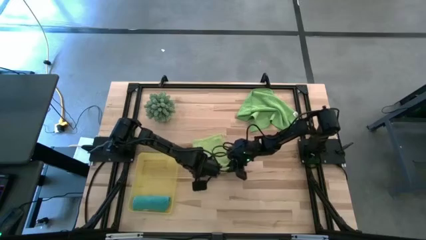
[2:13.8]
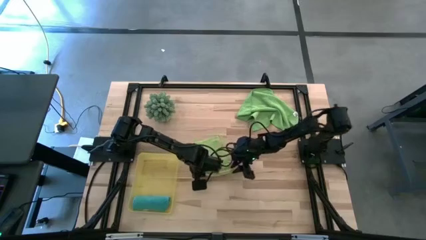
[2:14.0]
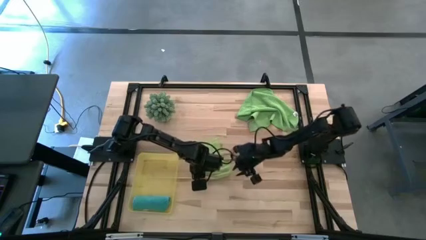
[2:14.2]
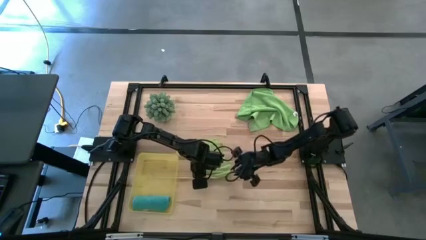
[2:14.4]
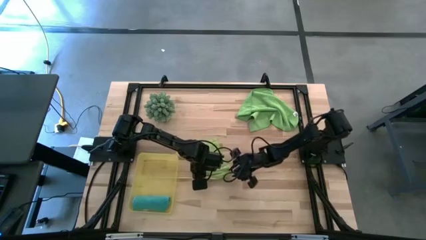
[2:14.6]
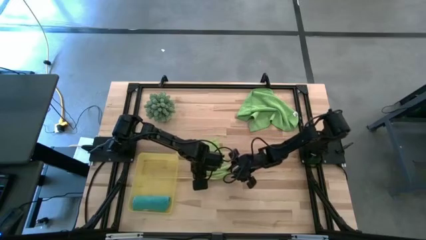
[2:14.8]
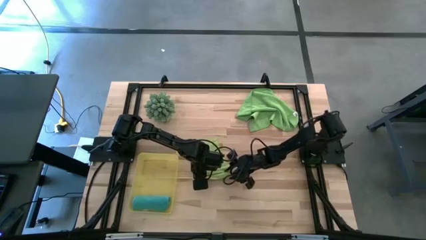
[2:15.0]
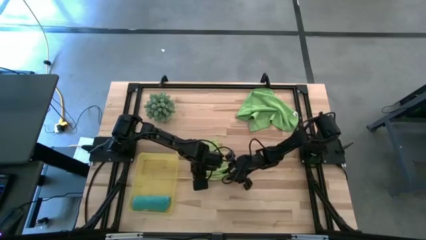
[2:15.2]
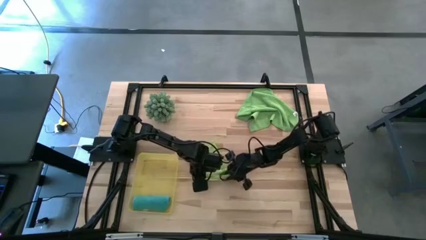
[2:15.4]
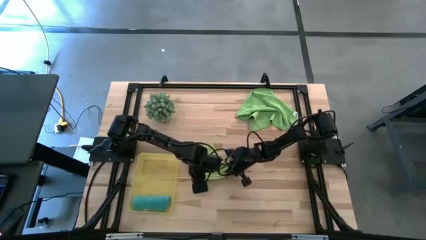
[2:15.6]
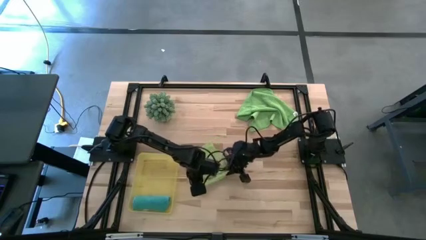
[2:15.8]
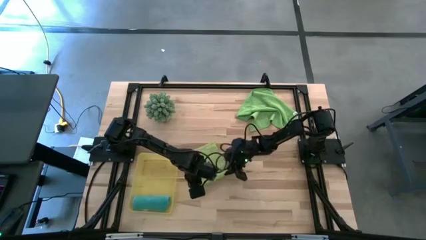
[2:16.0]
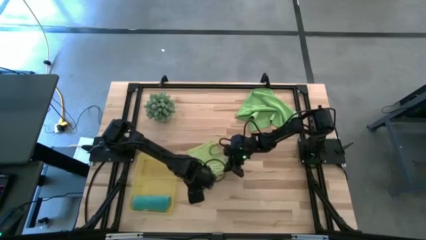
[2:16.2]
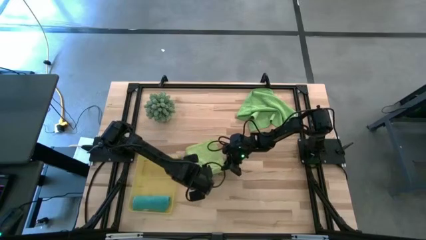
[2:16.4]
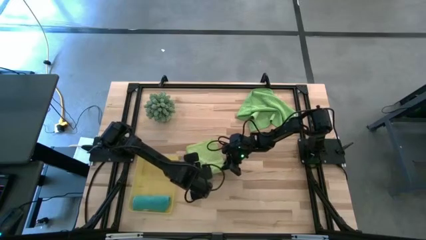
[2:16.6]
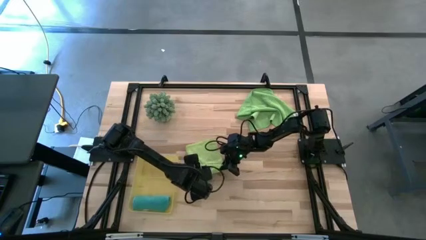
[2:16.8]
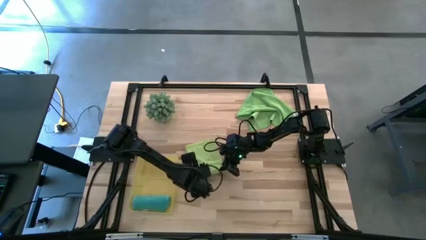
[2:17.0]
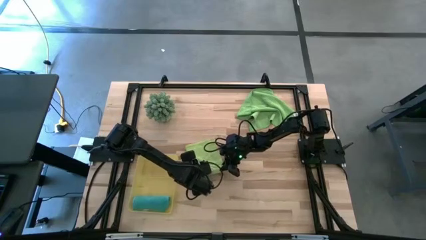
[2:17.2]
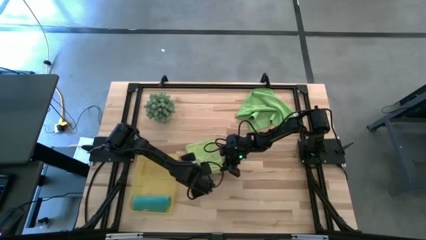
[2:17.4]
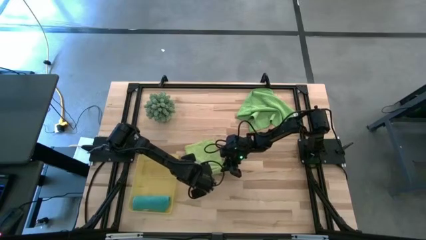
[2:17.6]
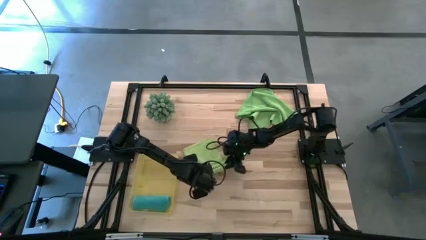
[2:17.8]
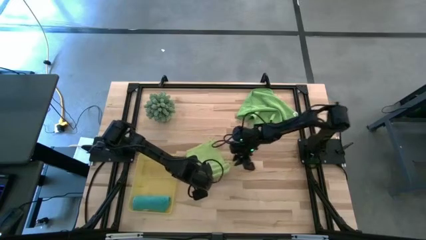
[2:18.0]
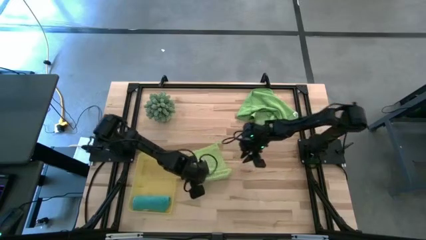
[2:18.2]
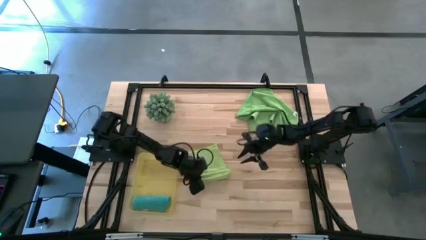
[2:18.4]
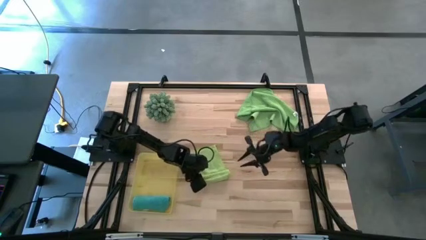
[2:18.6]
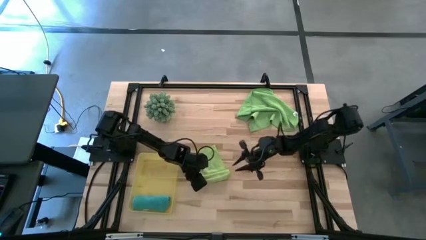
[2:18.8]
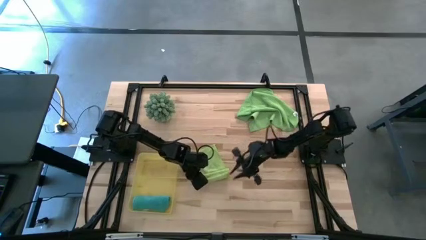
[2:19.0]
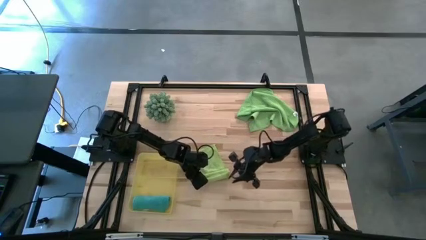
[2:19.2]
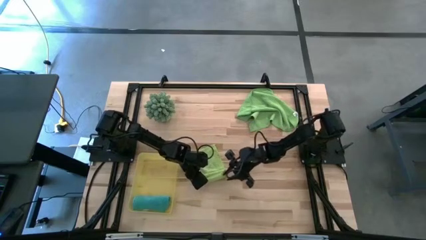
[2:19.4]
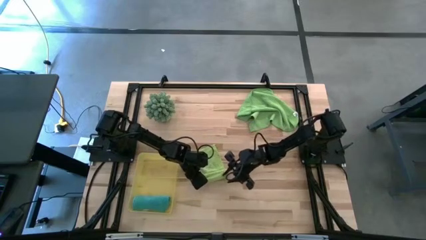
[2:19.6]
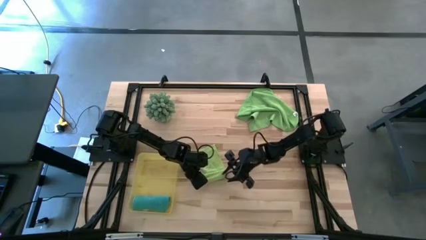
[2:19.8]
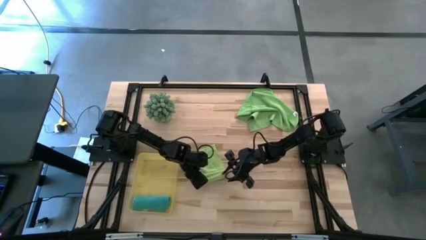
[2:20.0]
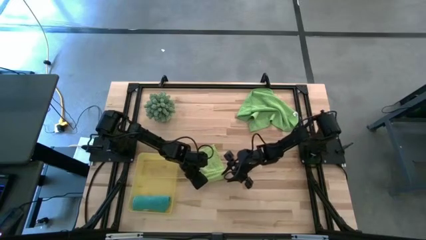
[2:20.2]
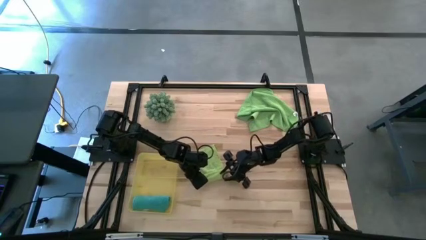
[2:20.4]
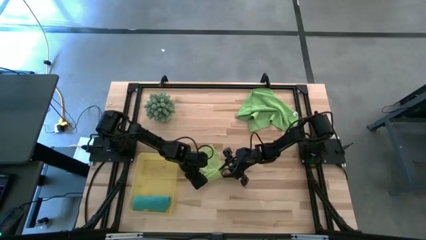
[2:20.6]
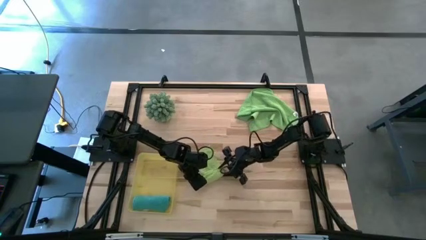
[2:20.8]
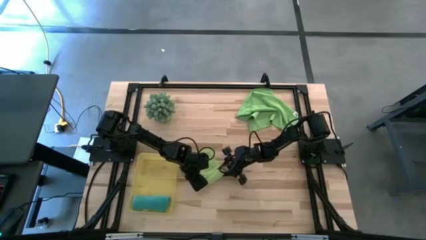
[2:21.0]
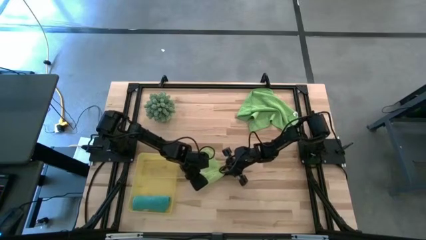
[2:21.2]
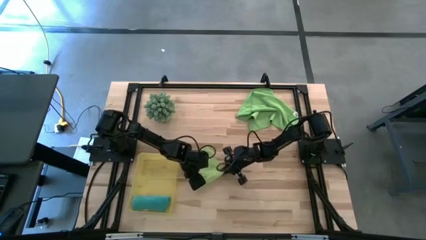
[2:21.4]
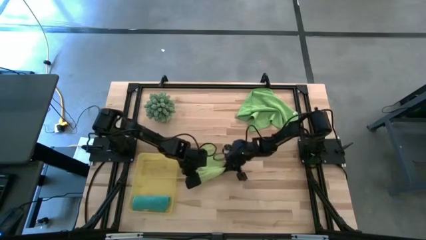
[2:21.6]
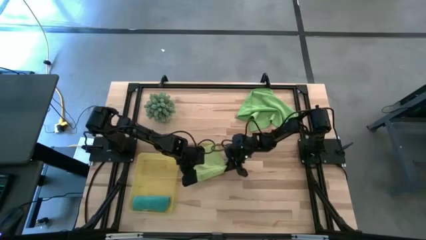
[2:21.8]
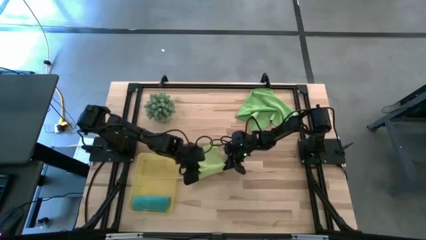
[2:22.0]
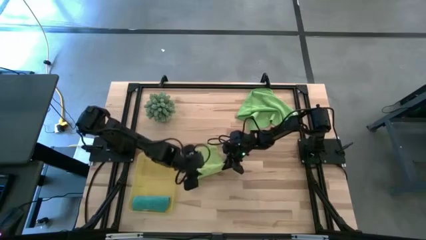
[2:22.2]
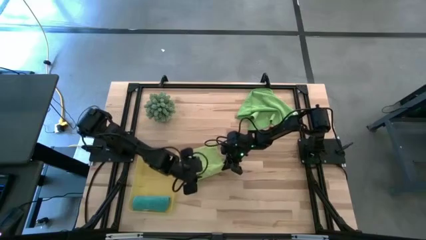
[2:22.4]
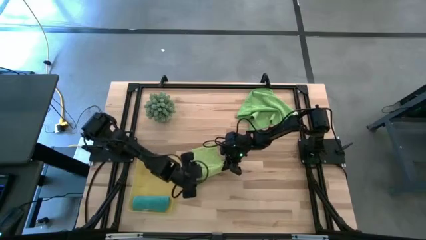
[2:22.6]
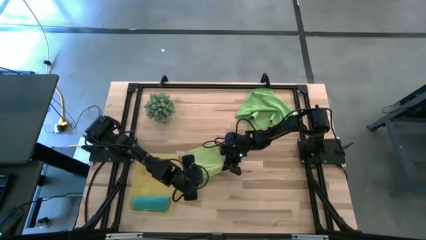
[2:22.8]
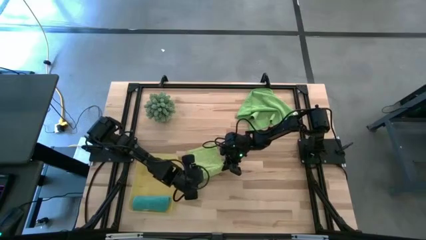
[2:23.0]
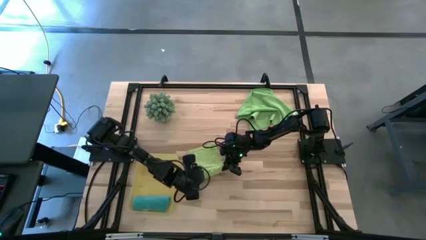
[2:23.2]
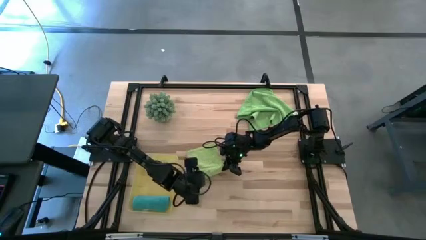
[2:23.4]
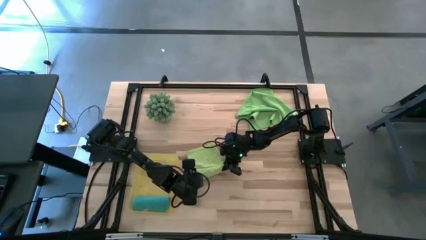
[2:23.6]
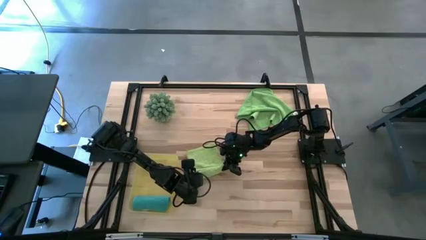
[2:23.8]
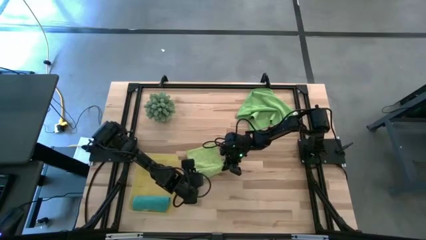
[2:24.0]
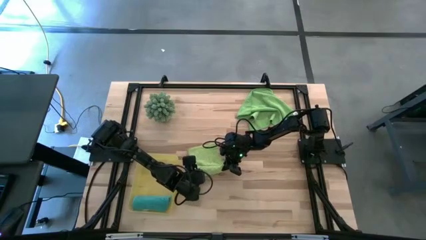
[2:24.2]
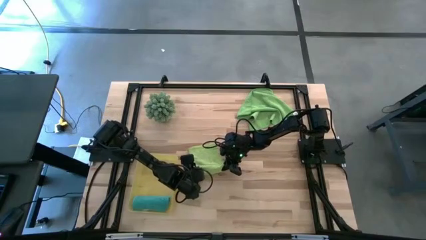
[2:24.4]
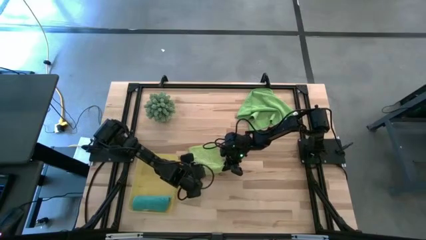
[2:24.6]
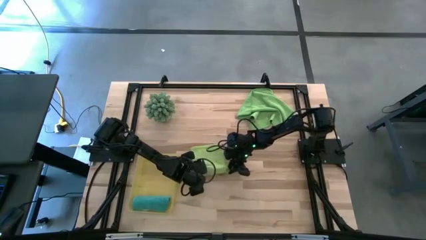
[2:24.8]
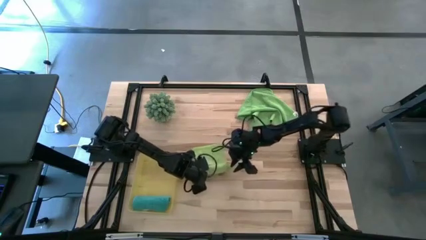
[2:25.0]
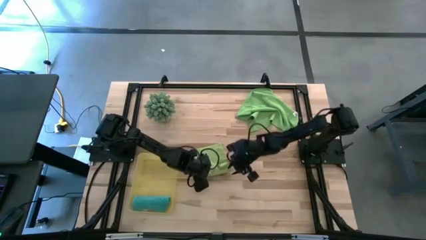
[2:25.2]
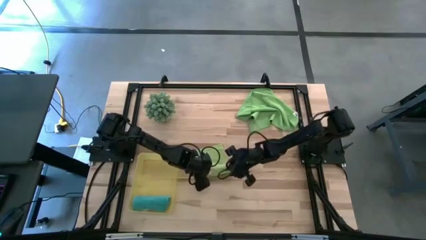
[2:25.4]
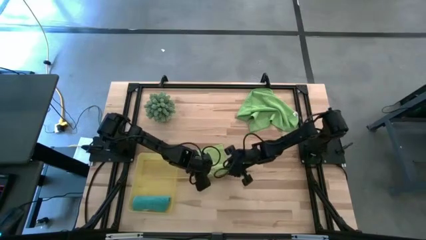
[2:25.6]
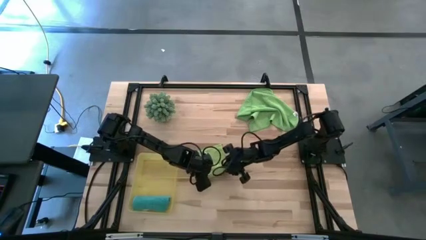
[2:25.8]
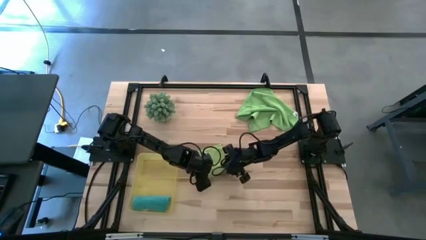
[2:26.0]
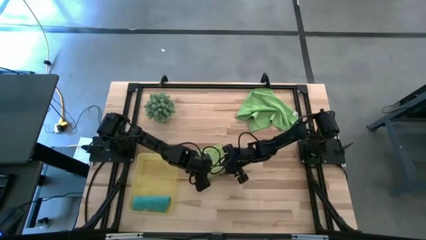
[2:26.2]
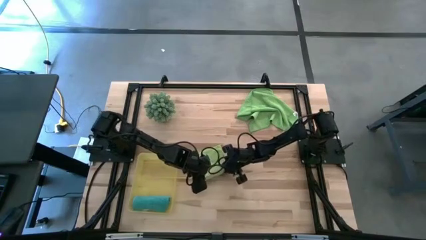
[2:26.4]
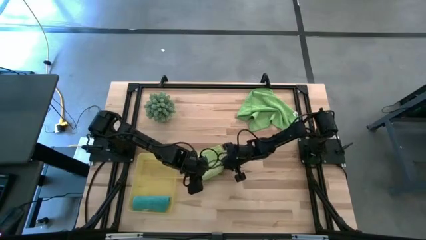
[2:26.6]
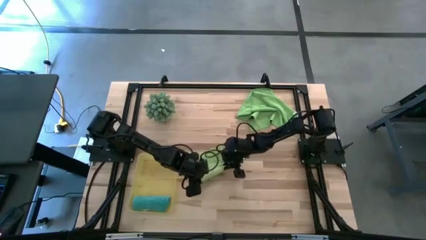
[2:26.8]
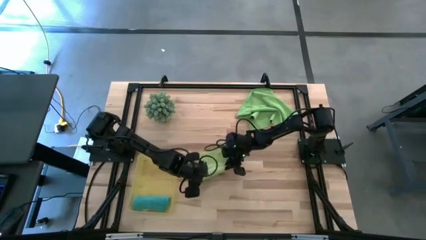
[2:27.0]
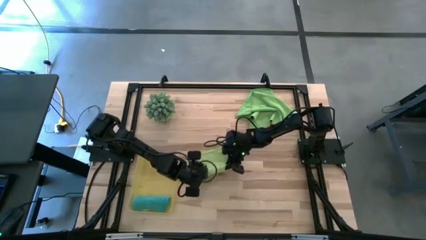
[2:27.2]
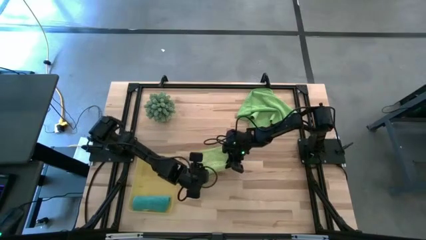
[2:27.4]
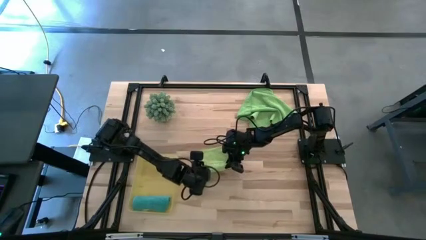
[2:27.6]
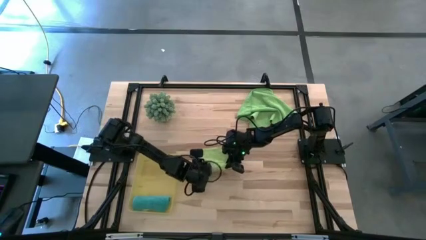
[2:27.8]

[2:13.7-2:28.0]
Task: Roll microfiber towels into tight, uniform cylinder then place into a basket
Roll the light green towel

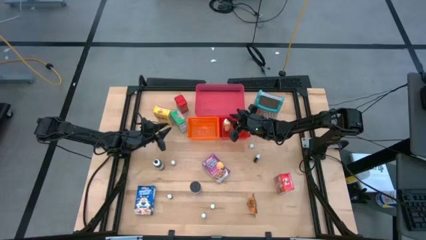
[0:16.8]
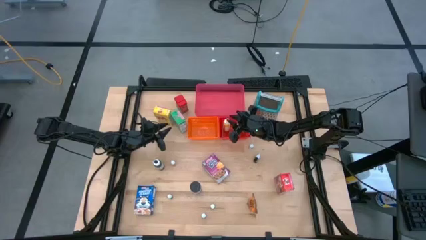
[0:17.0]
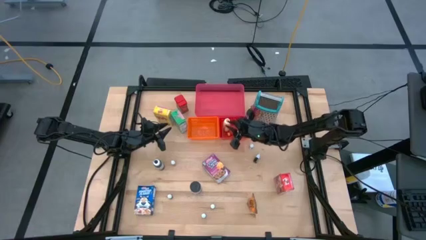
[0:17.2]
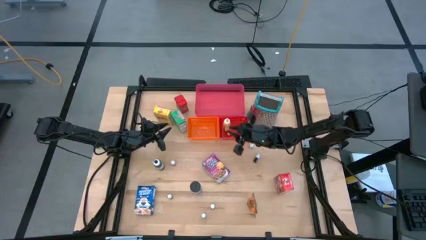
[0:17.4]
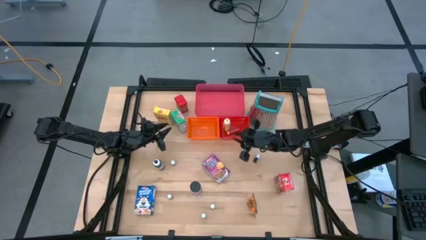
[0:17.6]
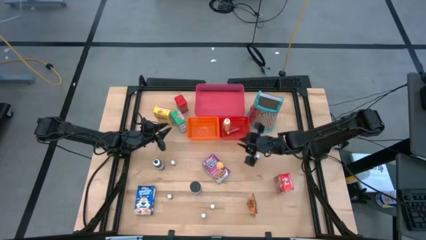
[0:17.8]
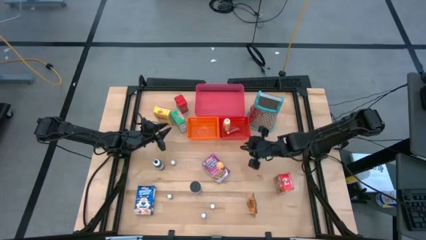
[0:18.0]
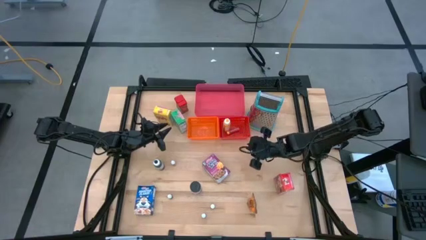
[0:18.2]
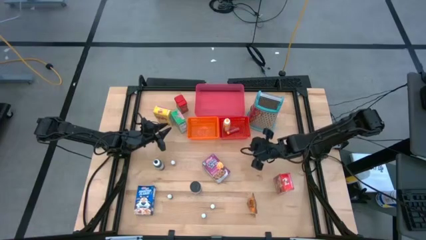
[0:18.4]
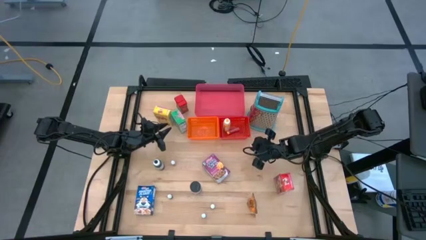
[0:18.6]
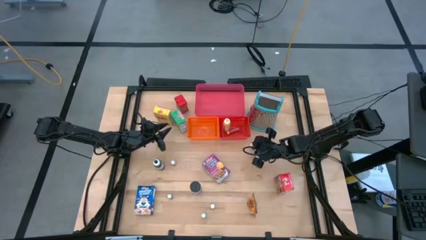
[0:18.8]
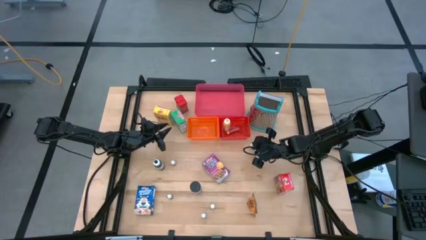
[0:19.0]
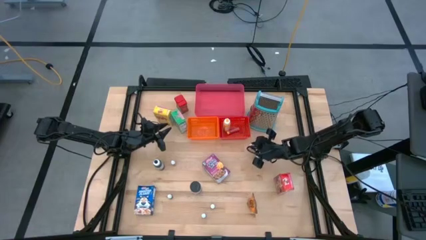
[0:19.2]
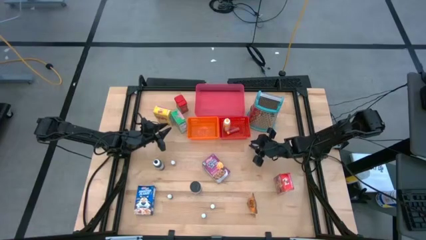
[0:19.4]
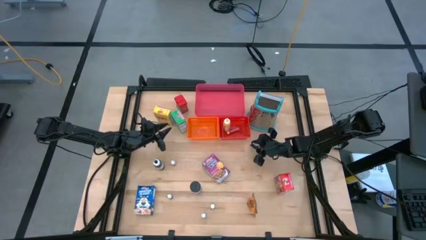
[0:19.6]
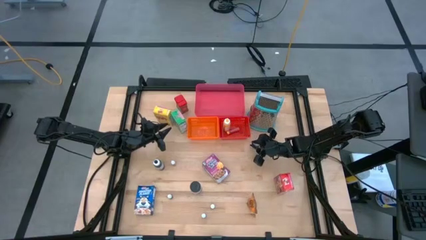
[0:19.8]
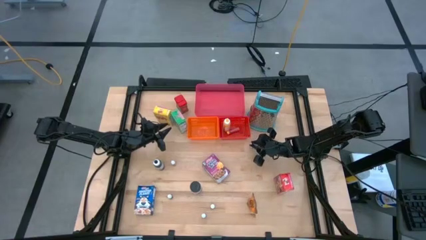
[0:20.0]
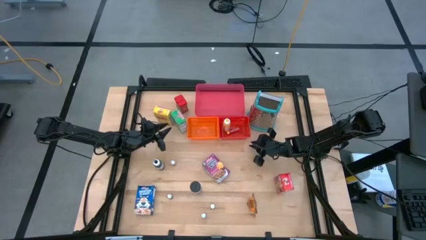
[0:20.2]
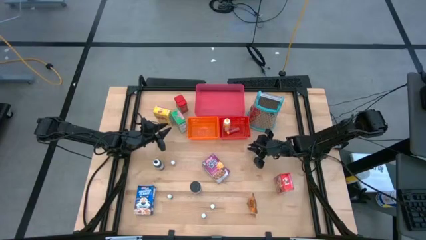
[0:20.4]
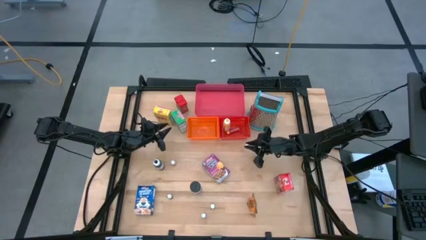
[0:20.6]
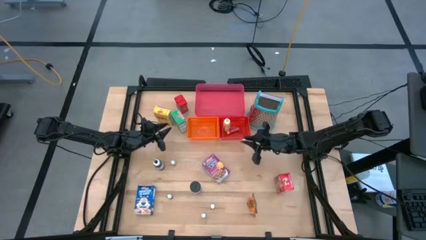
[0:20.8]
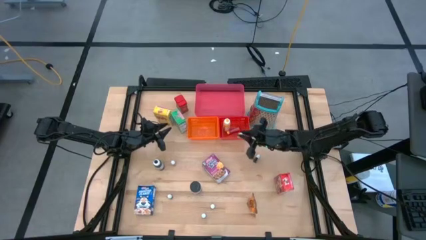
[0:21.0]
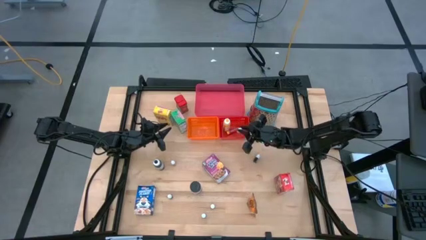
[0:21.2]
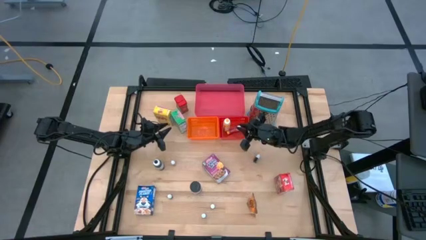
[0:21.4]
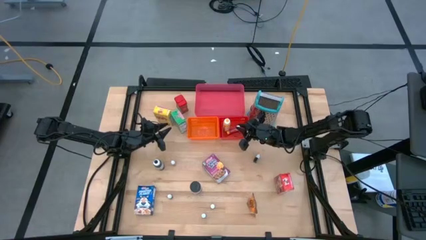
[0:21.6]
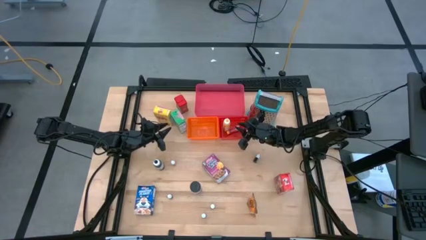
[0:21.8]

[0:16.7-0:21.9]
Task: Pick & Place Kitchen Items
Put the red food coloring bottle into the red bin
